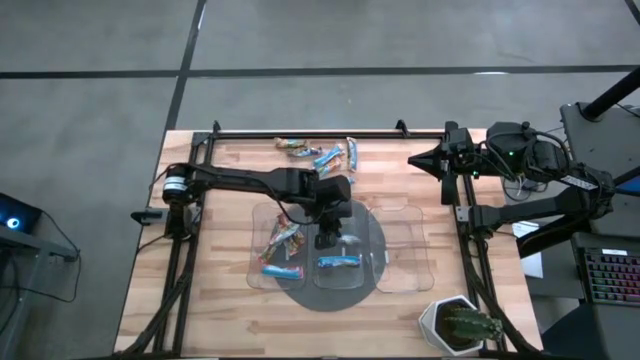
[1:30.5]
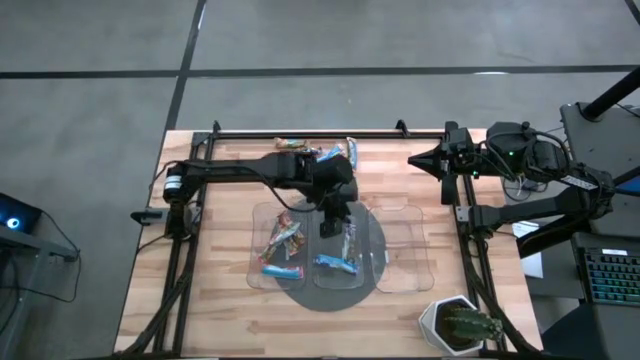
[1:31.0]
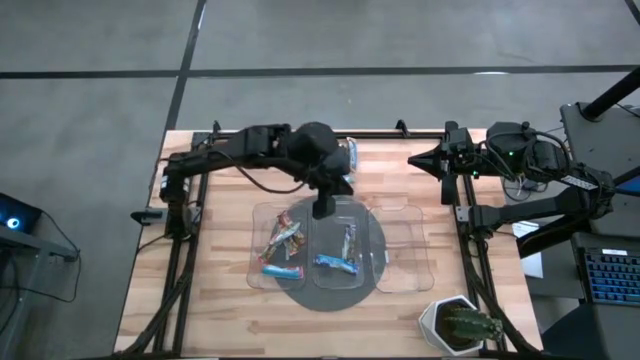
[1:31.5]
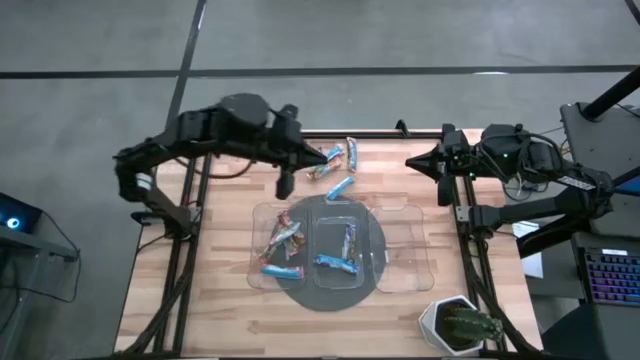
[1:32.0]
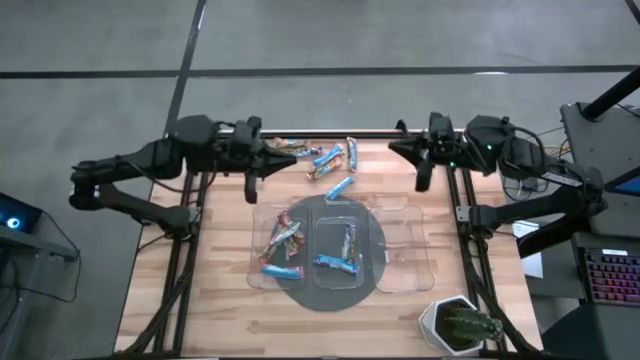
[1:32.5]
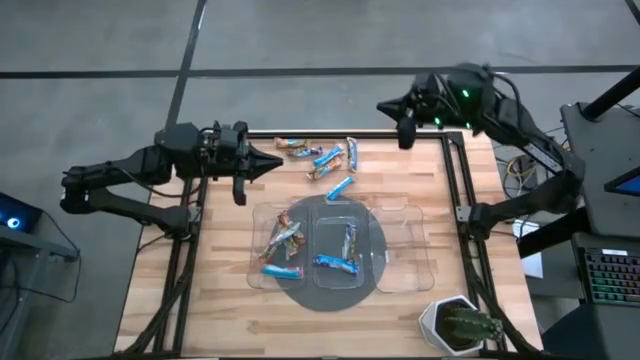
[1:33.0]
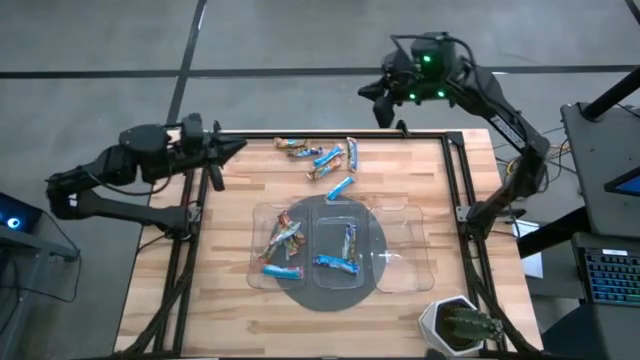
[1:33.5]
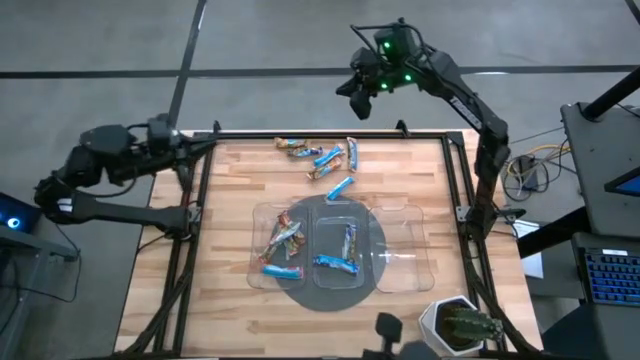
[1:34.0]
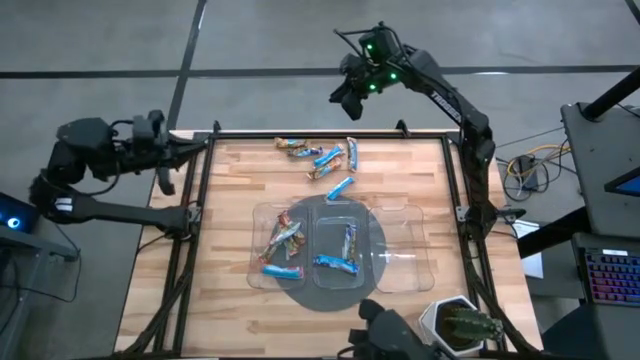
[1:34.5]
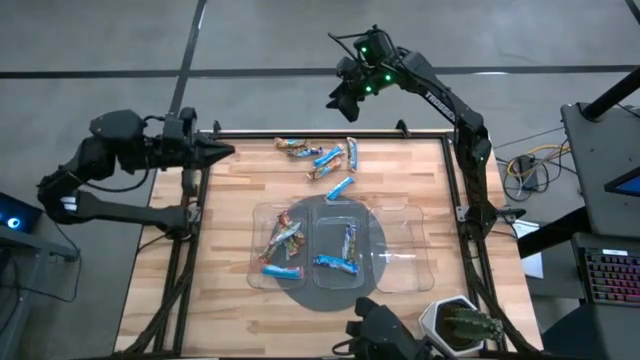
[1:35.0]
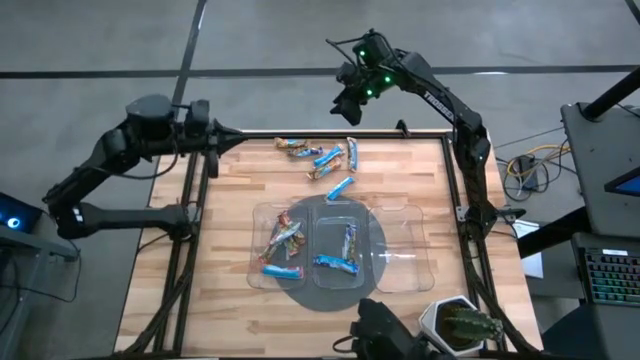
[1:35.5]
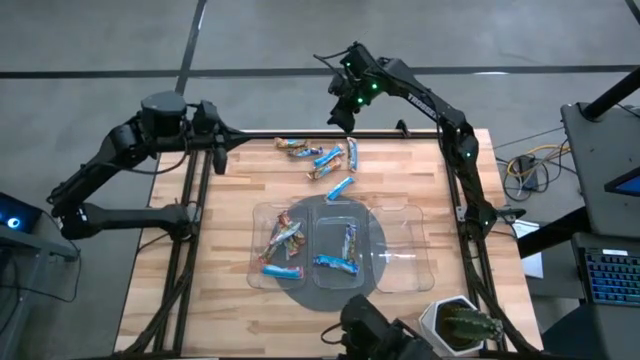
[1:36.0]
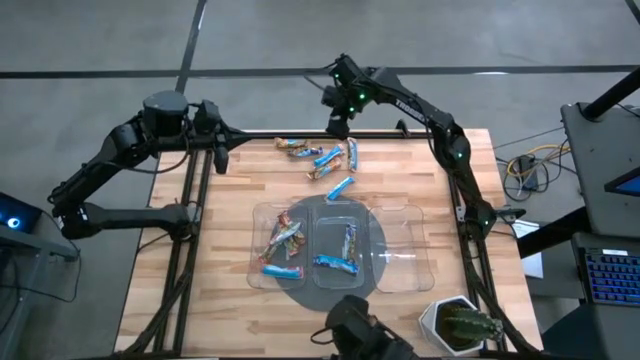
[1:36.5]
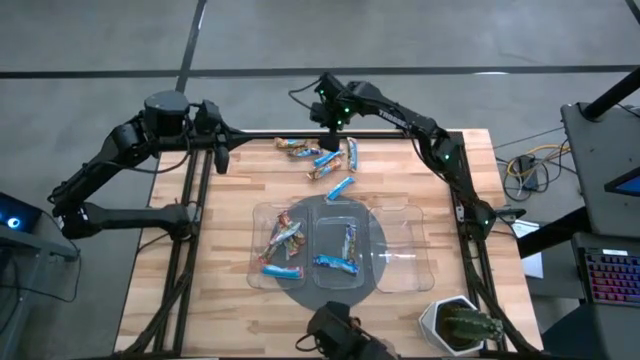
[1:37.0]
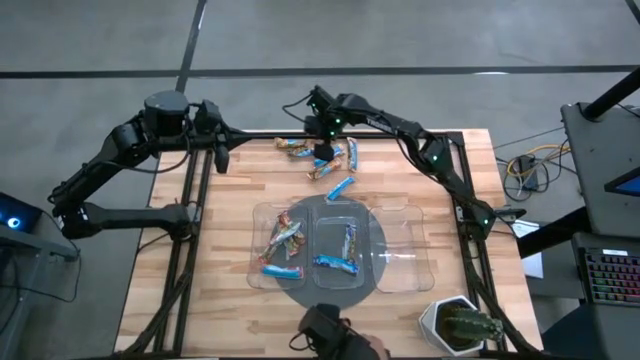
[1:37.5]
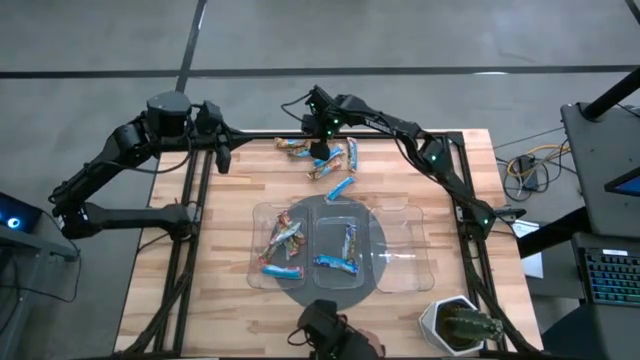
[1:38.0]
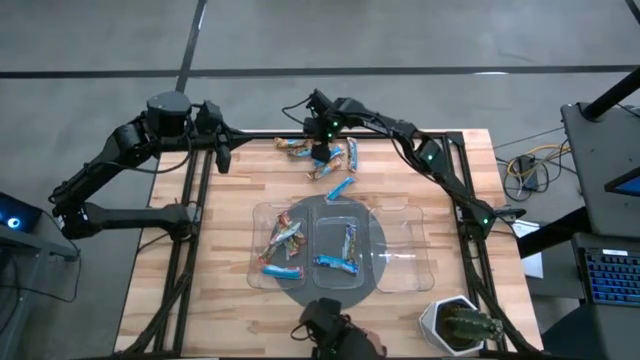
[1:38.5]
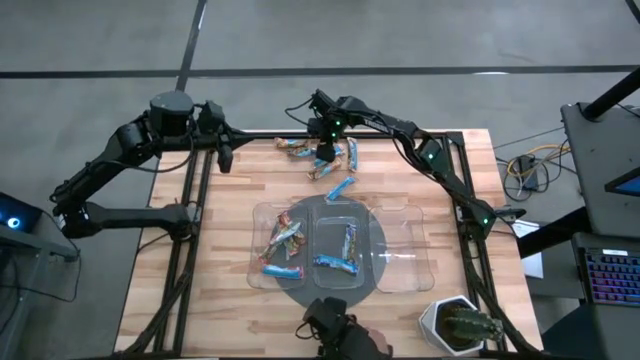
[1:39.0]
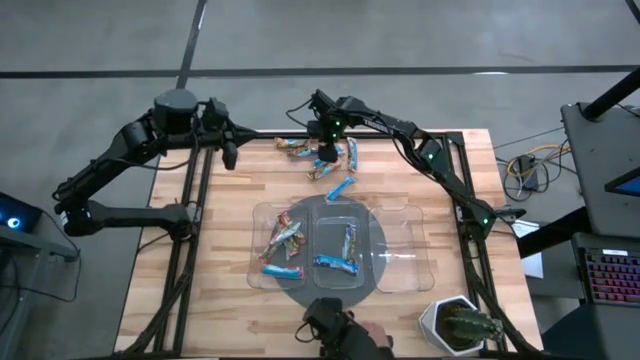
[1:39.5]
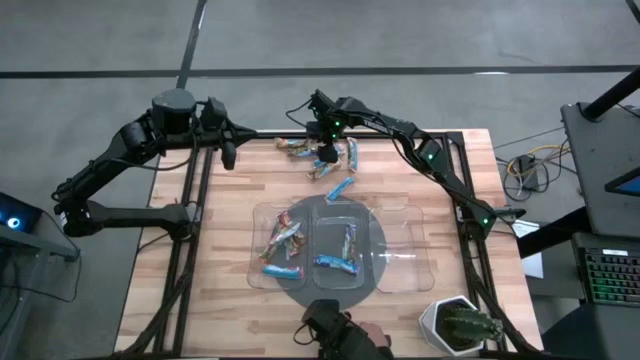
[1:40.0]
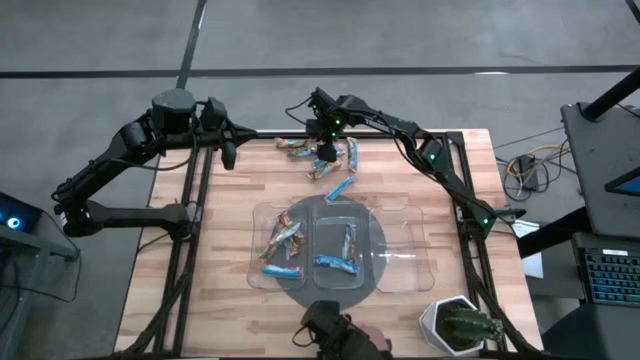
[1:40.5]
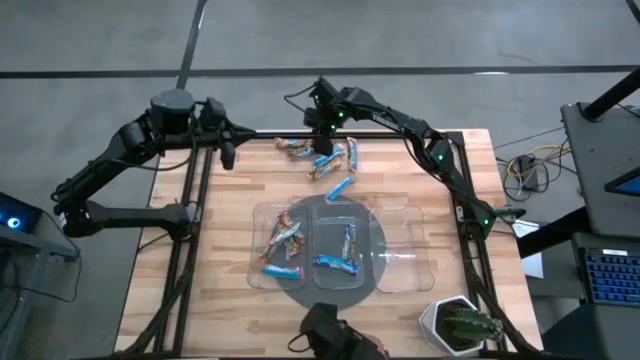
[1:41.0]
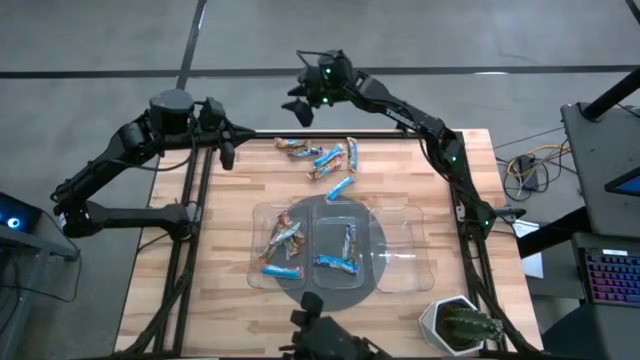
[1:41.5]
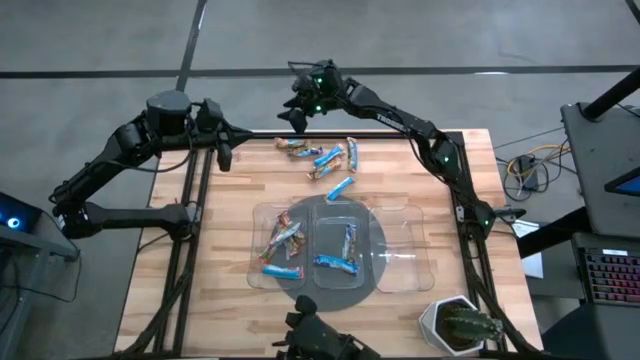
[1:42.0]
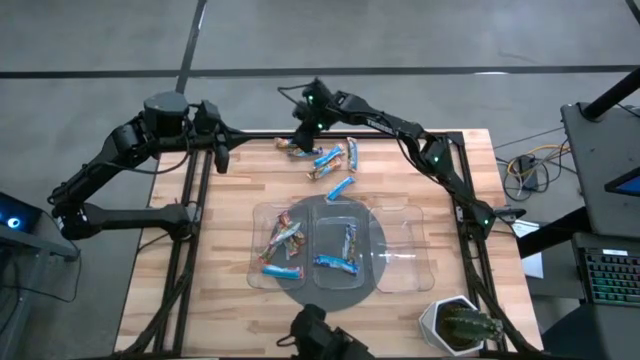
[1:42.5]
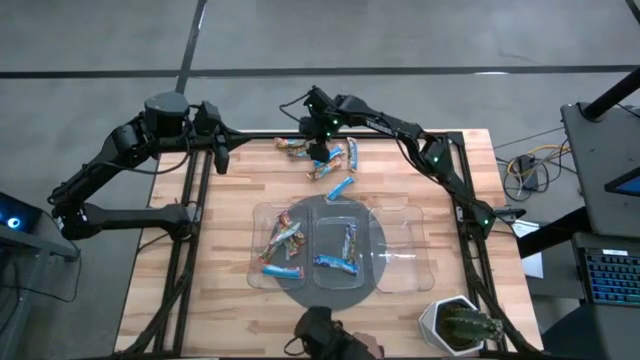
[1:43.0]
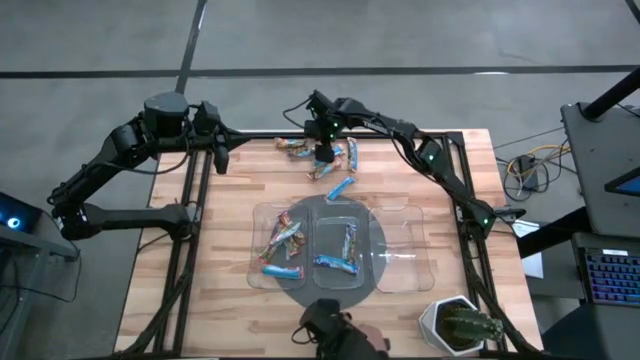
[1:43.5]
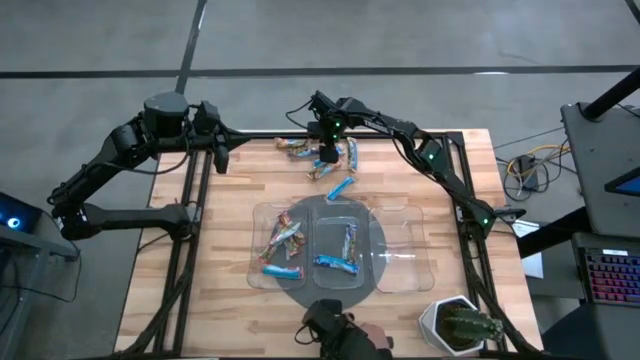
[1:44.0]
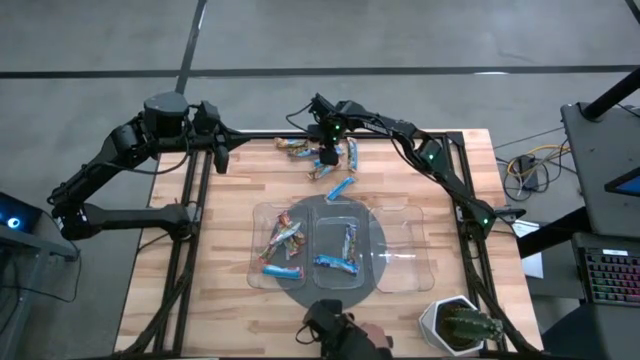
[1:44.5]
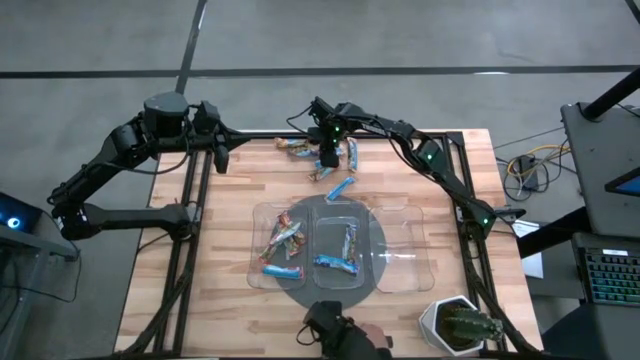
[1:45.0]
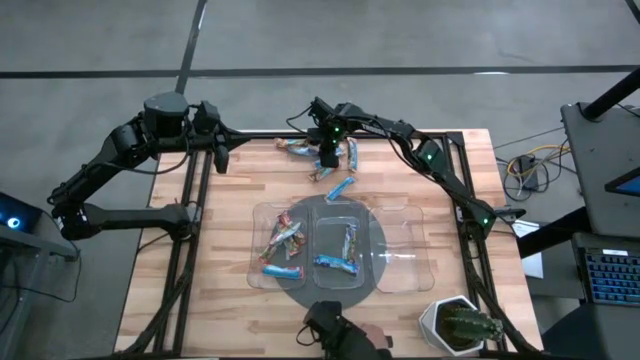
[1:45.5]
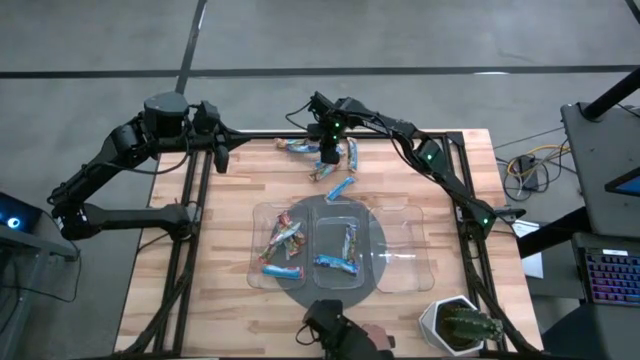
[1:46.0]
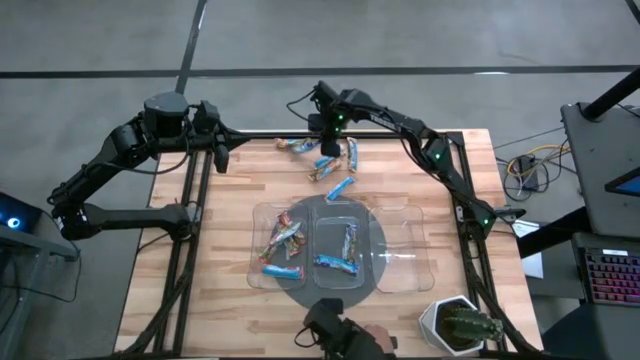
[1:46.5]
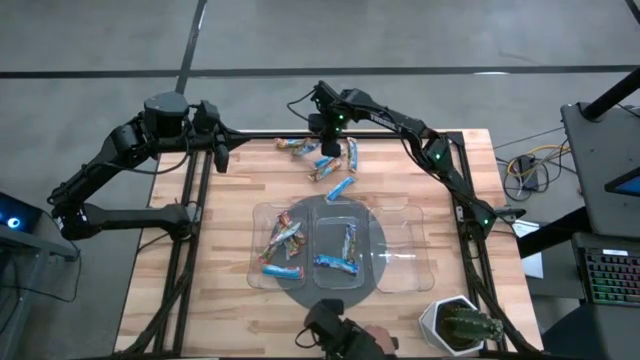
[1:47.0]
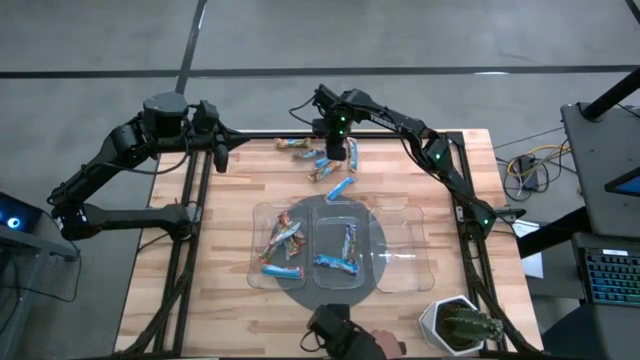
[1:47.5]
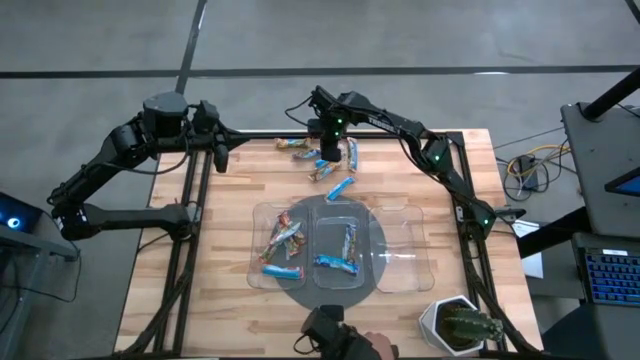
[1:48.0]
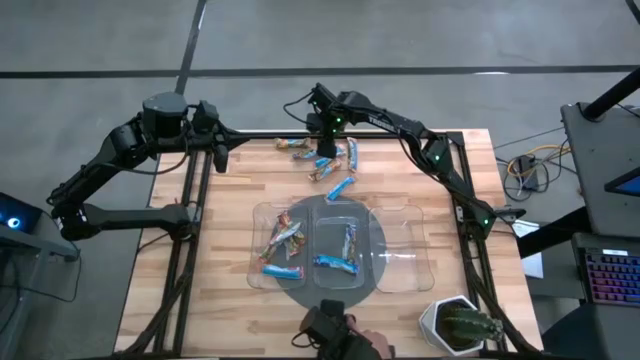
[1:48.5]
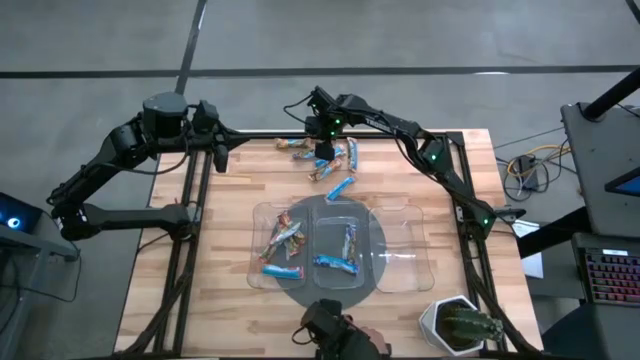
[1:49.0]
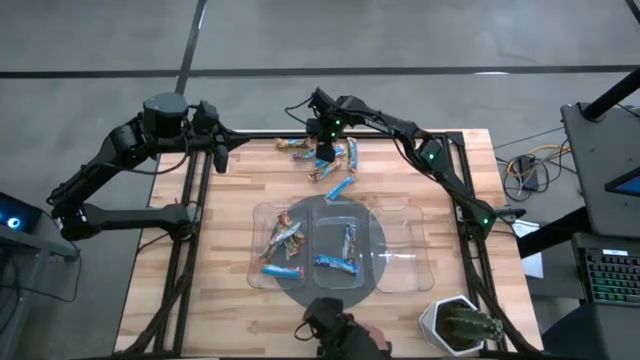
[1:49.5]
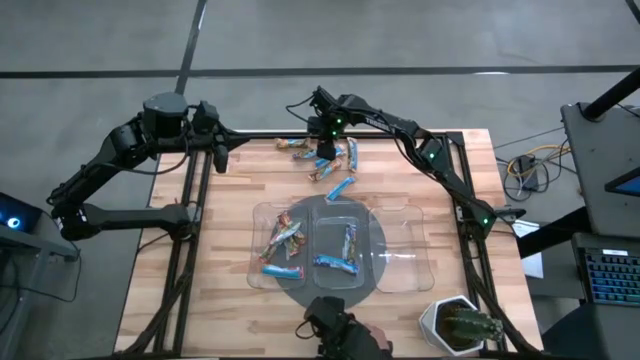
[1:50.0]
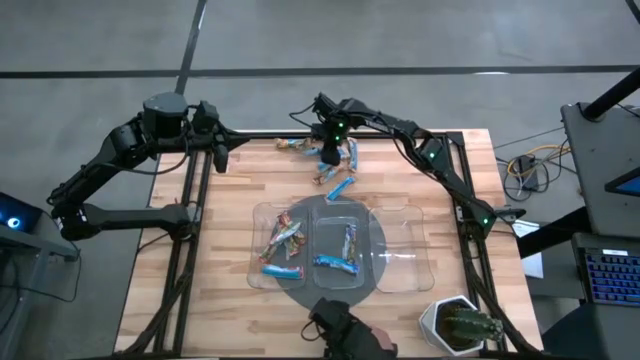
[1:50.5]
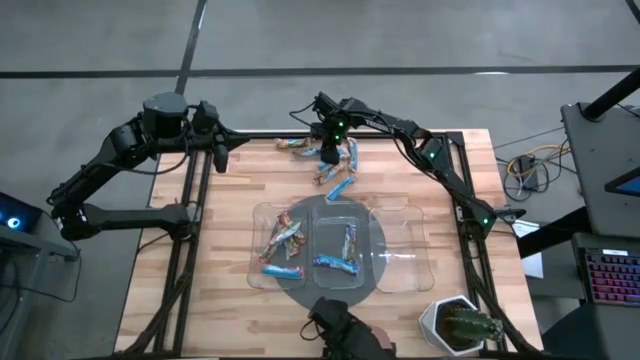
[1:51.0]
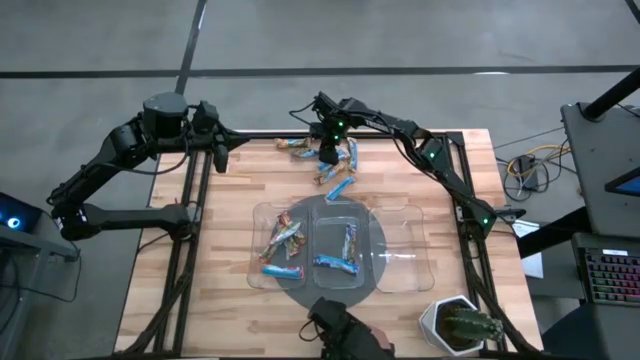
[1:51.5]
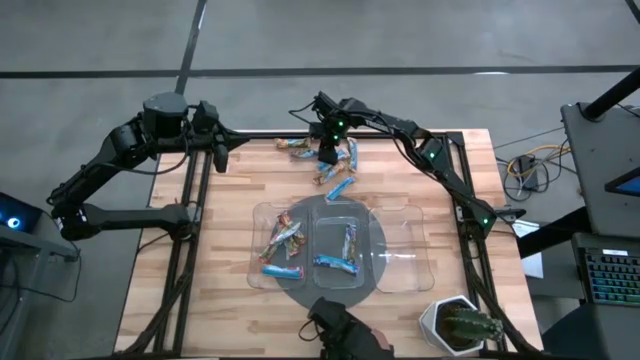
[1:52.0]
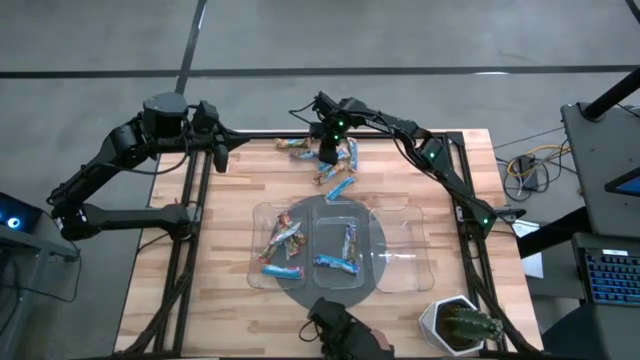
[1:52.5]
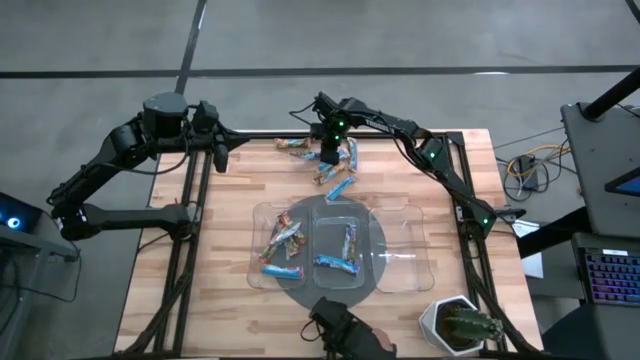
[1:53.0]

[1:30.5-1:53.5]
Task: Pick and place Granola Bars by type
Put the blue granola bar into the middle transparent bin
